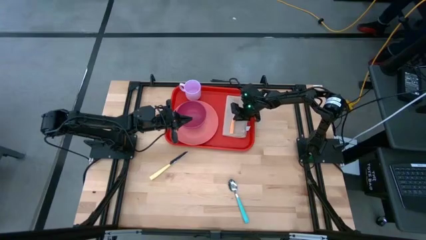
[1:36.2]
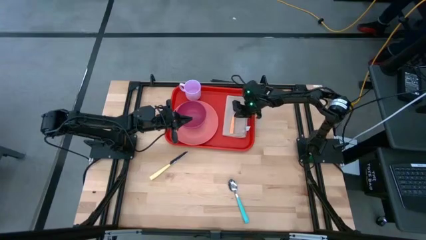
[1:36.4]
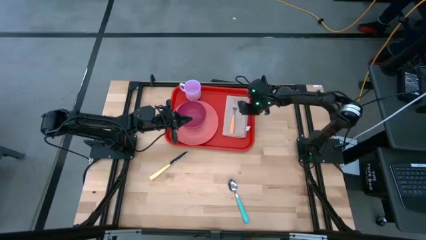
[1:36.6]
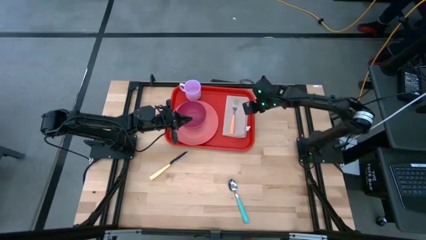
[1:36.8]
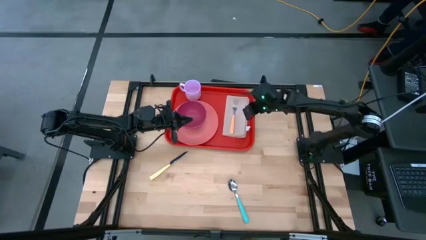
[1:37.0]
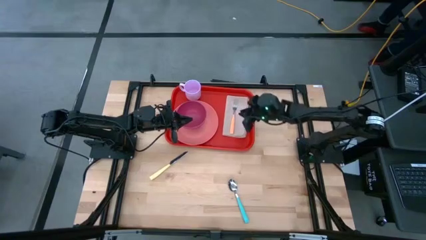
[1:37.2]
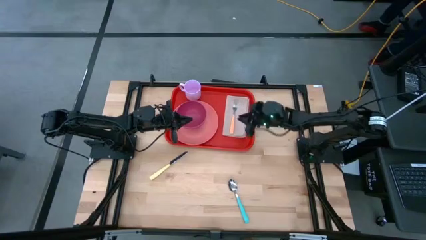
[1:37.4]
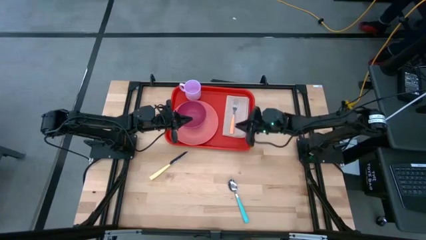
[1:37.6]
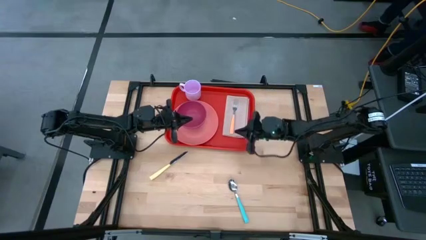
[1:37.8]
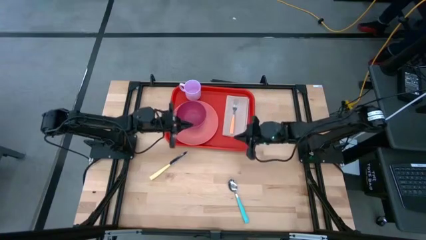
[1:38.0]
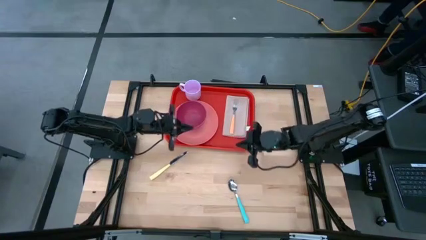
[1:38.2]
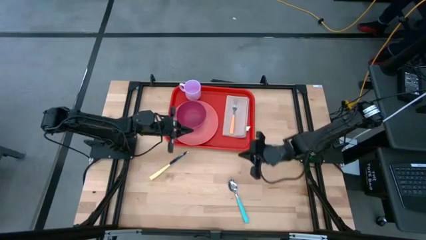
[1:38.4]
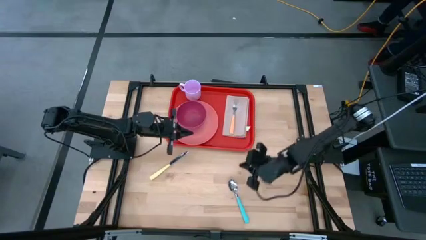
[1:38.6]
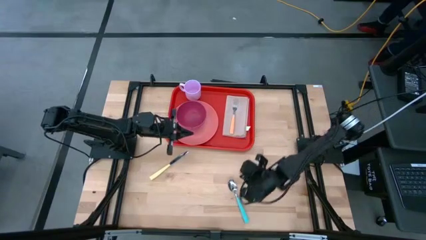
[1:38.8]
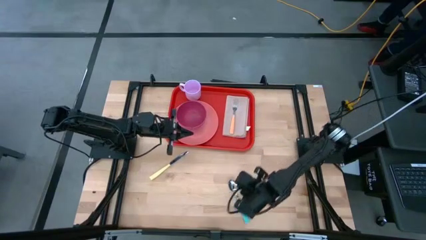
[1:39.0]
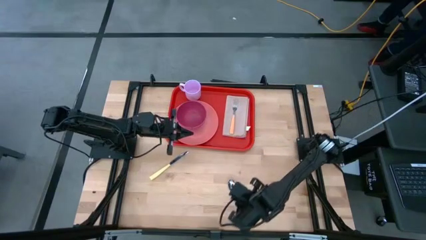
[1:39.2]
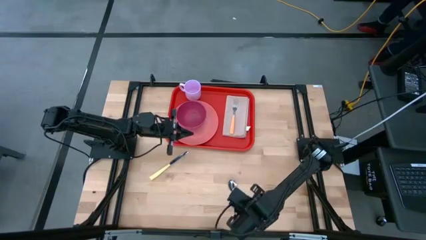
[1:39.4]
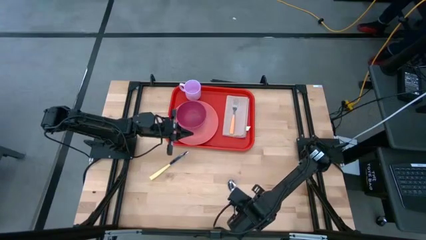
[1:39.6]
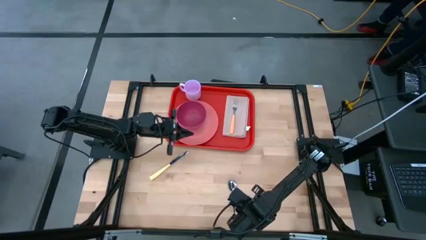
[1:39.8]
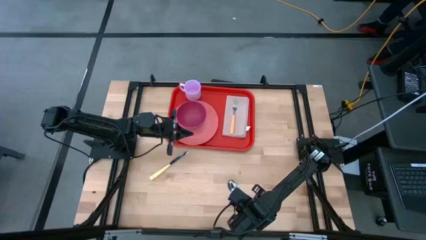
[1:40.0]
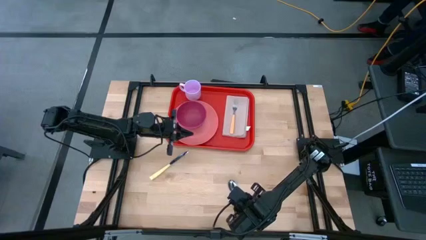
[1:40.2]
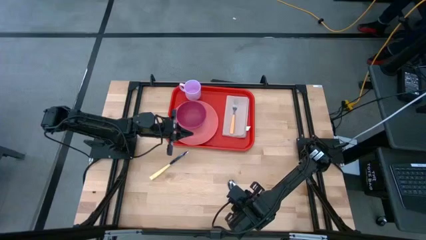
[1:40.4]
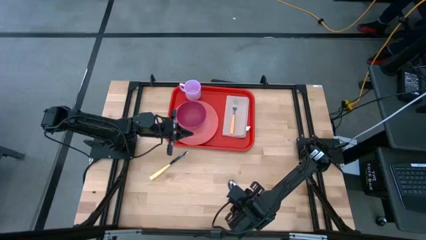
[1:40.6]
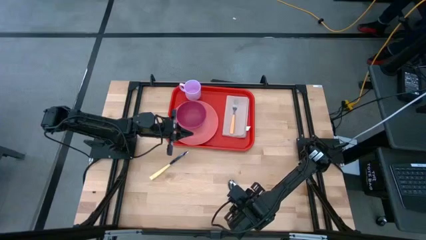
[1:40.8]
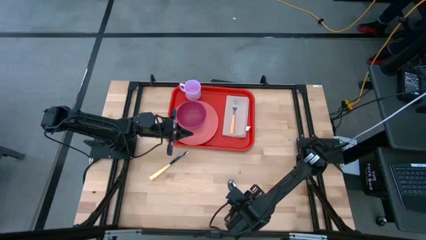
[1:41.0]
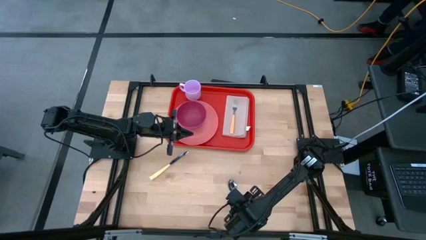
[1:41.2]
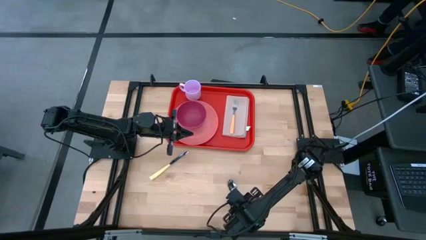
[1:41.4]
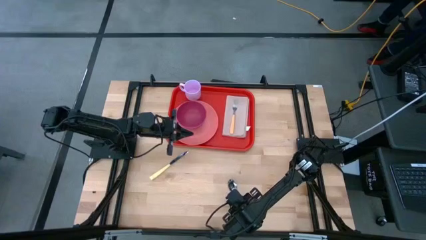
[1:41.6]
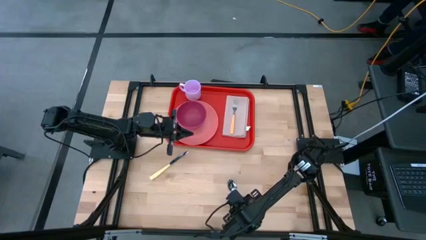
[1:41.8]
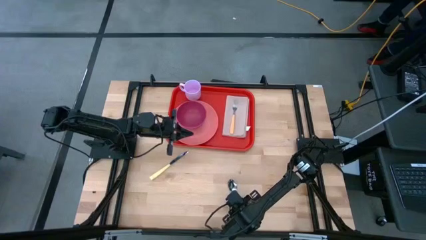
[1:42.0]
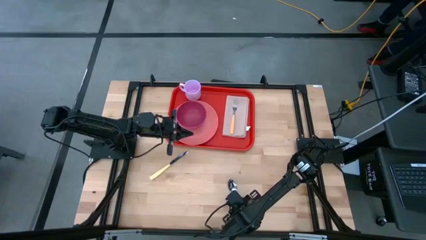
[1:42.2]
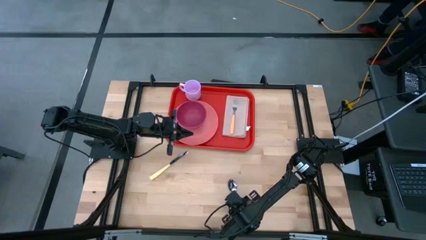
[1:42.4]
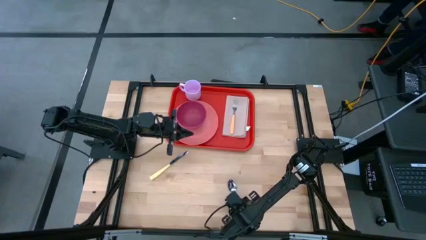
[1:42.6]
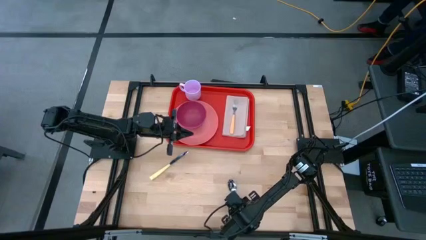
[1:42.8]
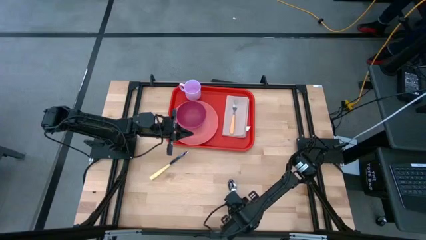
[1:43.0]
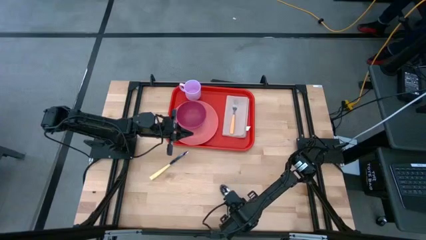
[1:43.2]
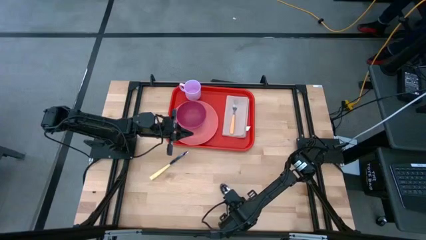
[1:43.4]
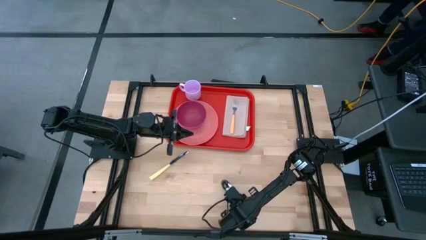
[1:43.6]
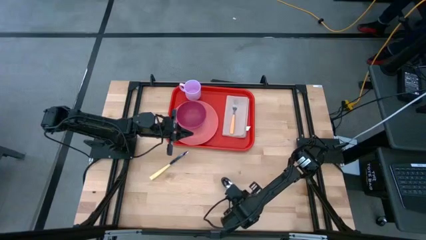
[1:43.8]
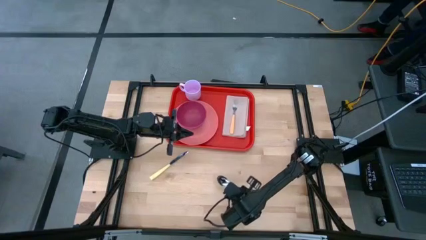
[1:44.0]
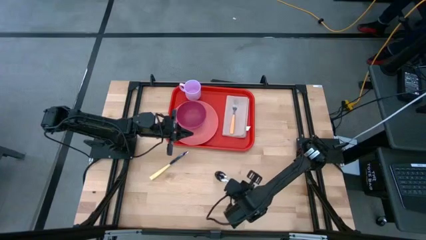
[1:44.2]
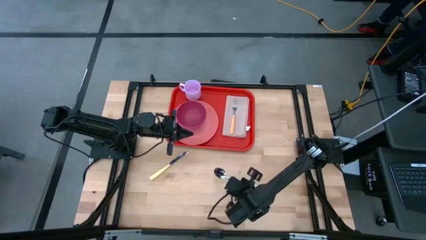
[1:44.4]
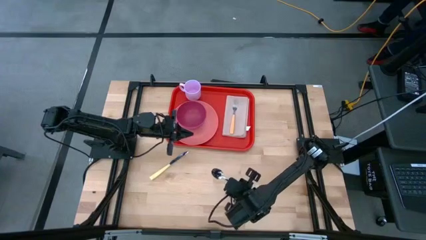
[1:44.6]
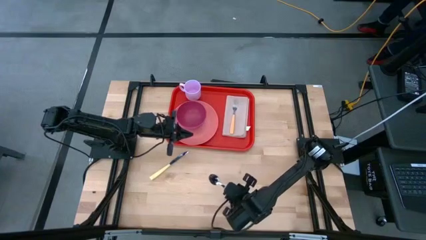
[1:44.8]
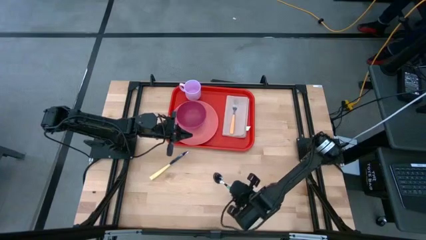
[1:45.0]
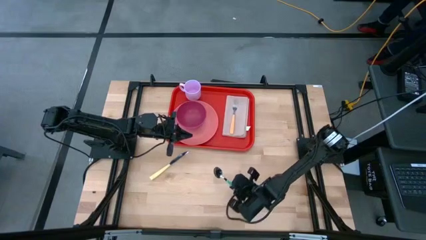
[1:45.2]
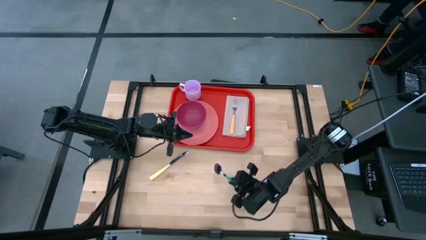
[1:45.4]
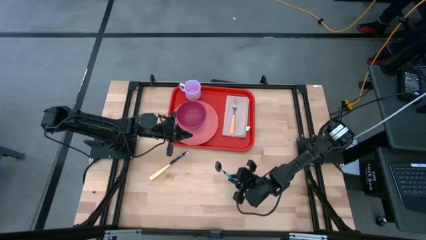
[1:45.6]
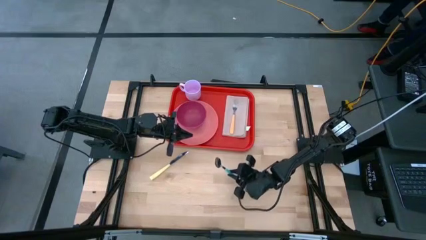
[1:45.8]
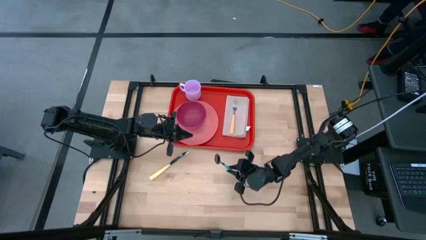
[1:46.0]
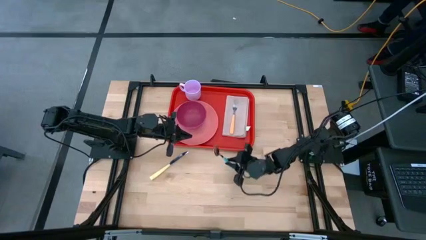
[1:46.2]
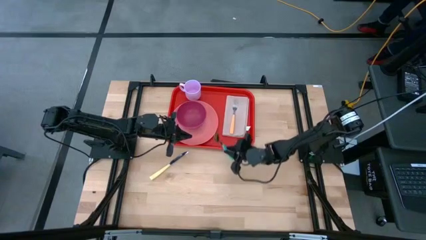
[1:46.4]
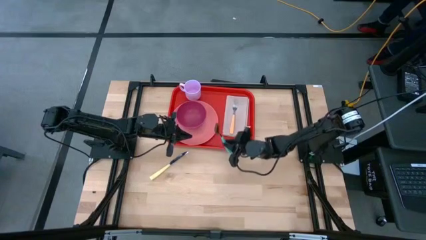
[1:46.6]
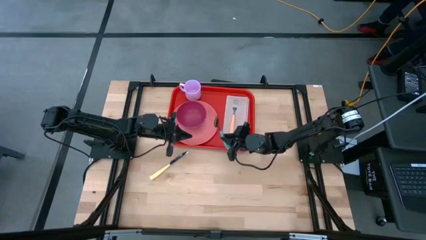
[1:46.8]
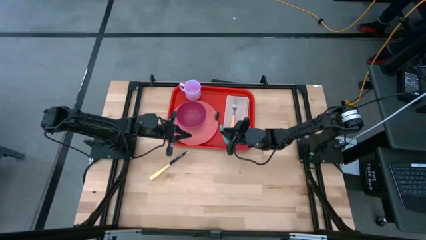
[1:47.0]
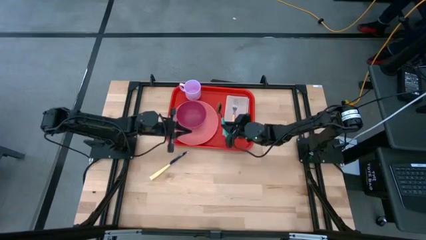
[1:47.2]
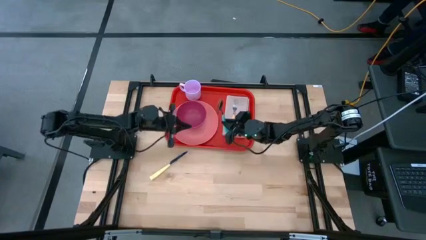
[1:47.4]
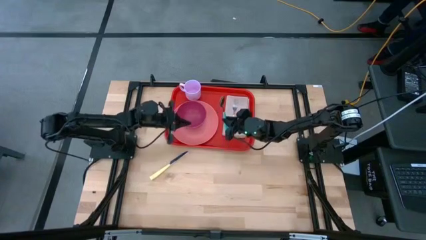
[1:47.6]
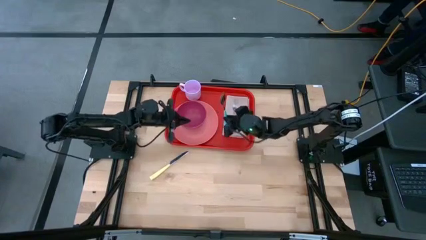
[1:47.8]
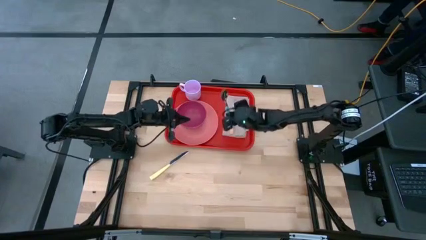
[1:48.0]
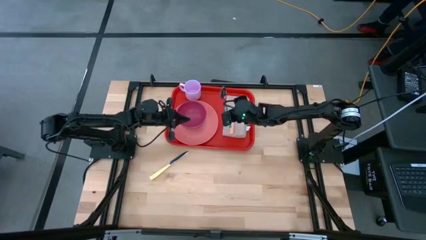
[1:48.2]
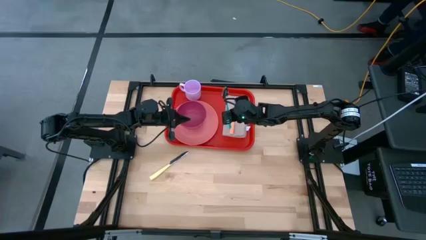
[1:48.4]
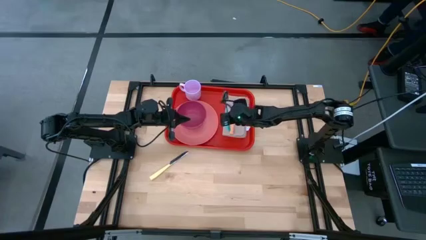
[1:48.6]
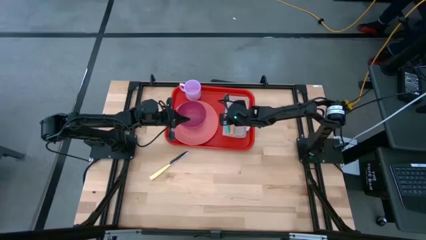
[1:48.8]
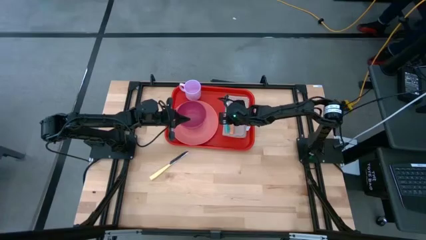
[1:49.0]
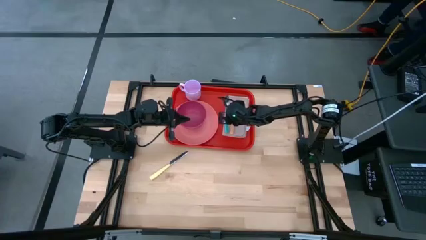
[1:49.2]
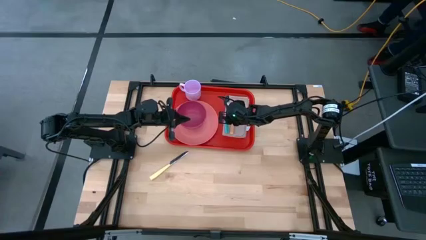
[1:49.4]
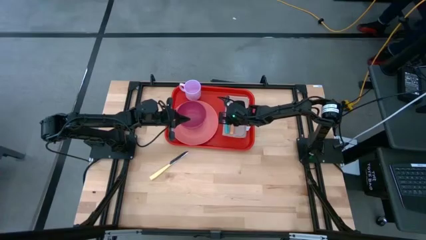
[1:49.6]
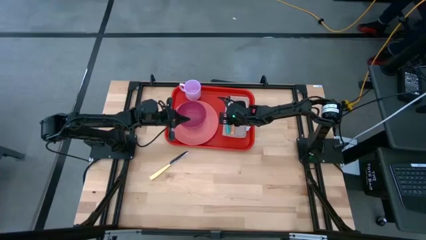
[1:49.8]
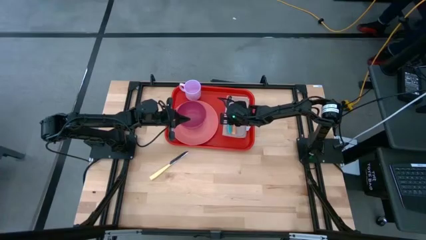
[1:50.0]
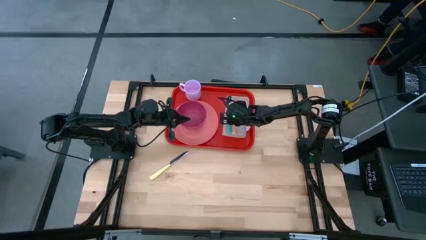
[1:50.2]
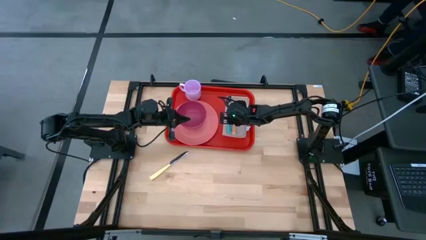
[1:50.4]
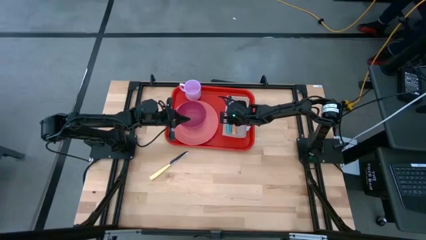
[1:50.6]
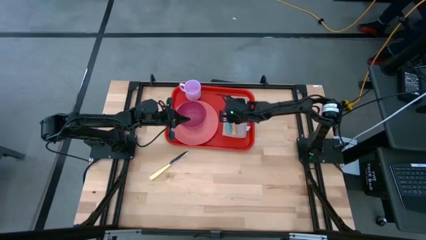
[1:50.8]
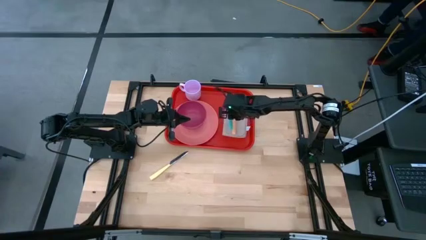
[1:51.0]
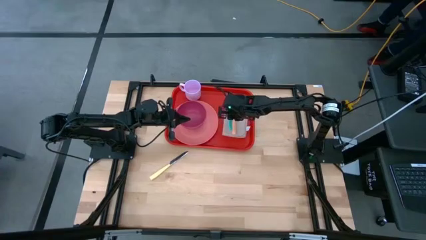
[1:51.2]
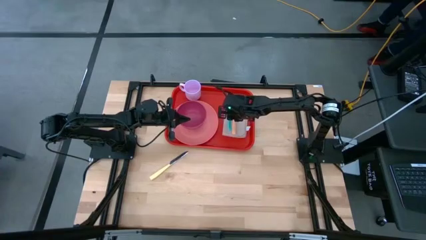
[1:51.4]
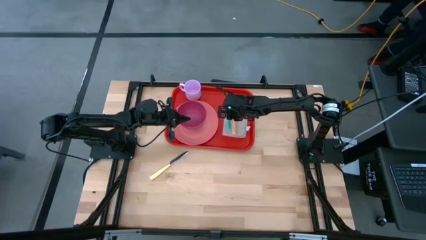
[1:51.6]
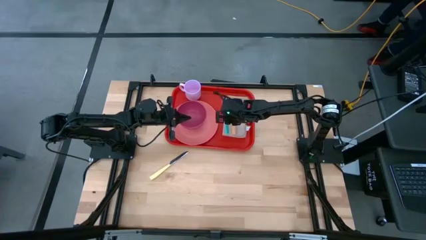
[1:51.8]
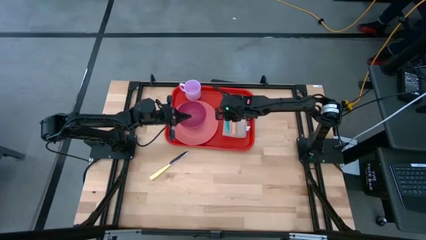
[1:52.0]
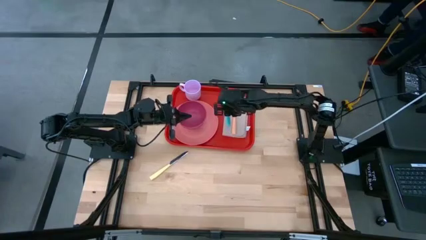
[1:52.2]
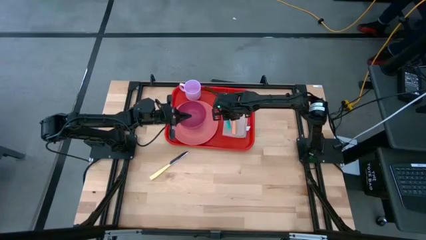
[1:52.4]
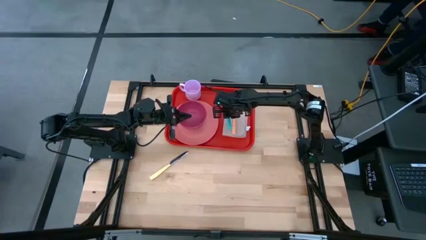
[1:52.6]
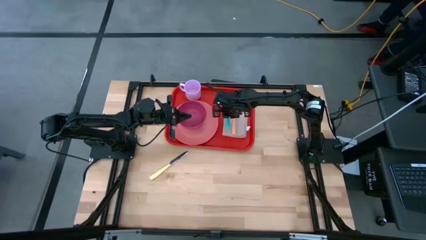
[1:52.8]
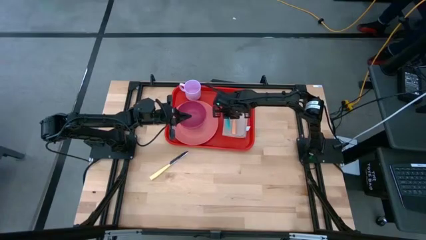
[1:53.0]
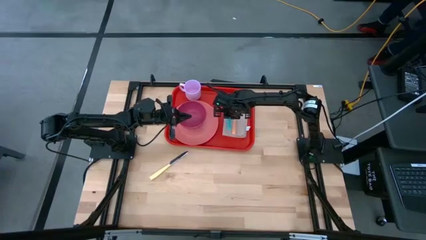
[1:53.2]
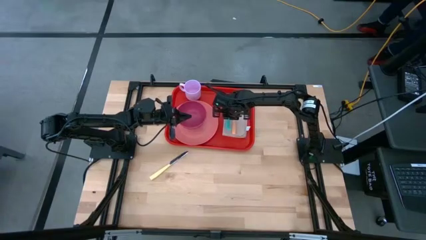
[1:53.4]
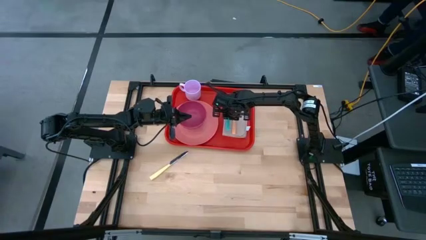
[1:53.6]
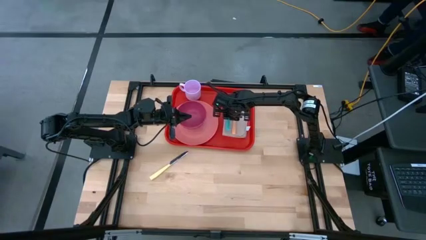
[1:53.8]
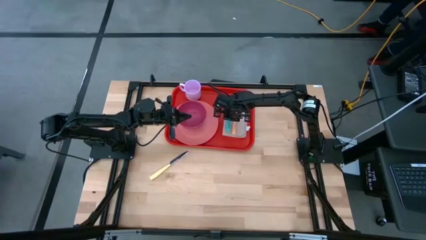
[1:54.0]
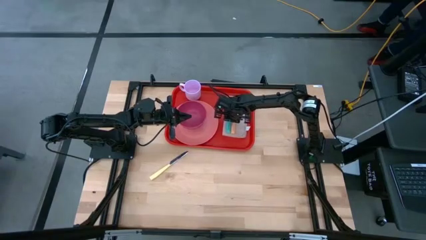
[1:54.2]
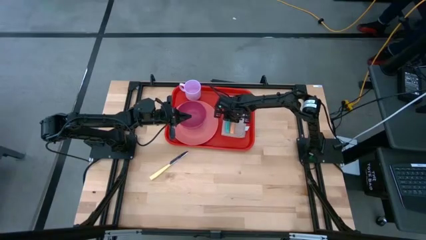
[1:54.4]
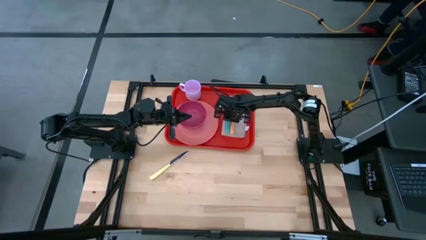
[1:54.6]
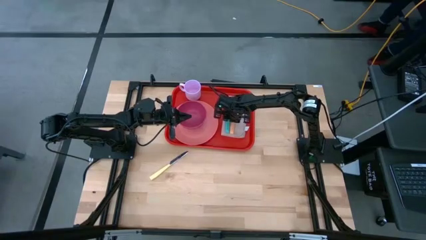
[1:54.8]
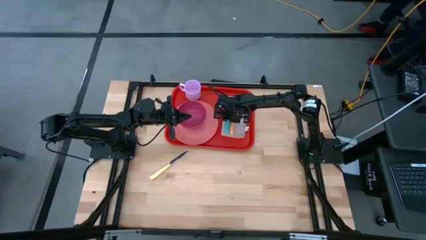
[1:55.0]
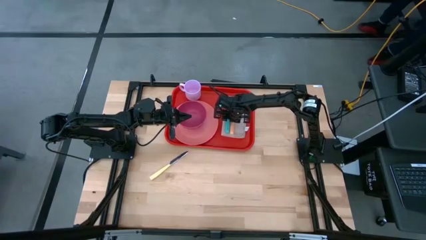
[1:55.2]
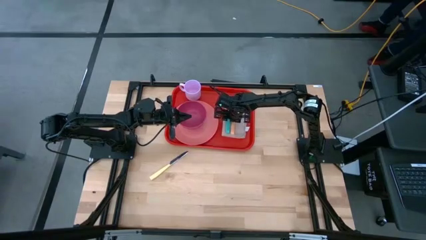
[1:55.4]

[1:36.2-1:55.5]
Task: Set up tray
Put the blue spoon on the light brown napkin
